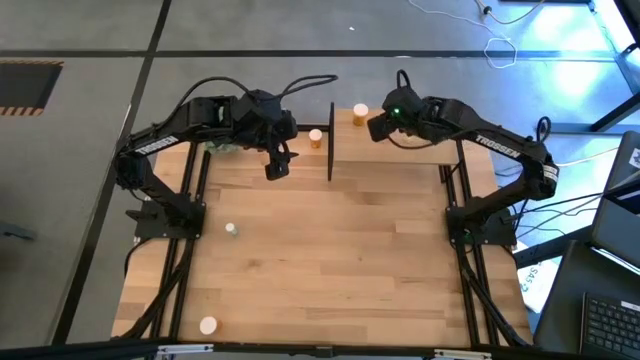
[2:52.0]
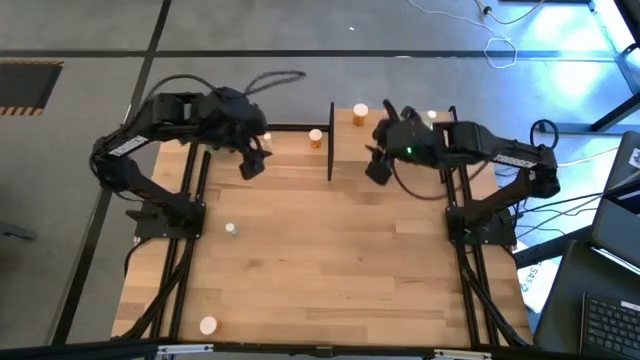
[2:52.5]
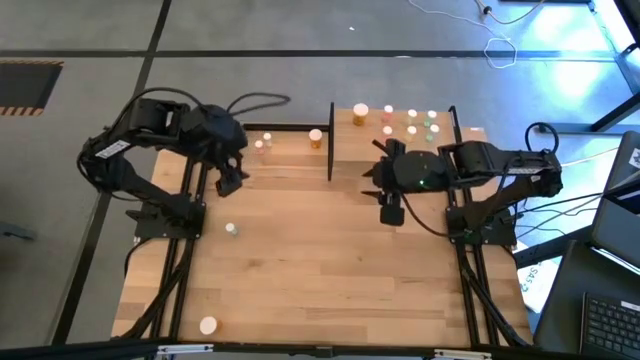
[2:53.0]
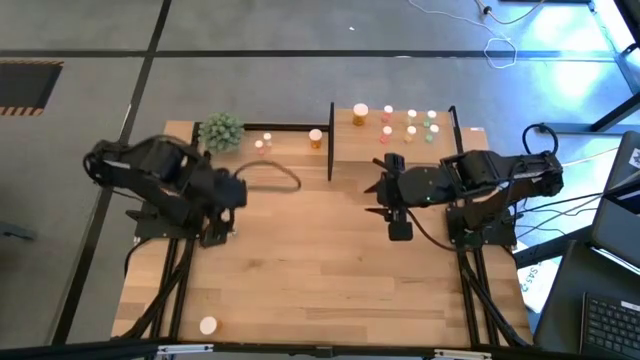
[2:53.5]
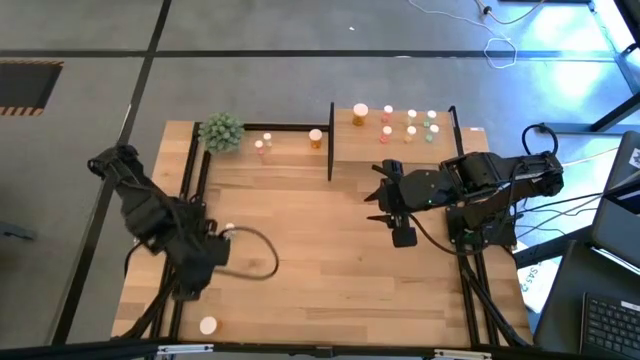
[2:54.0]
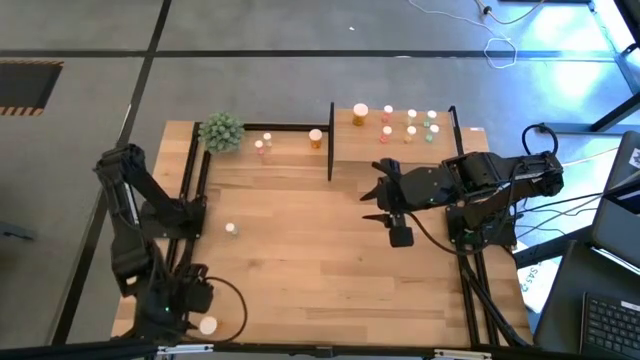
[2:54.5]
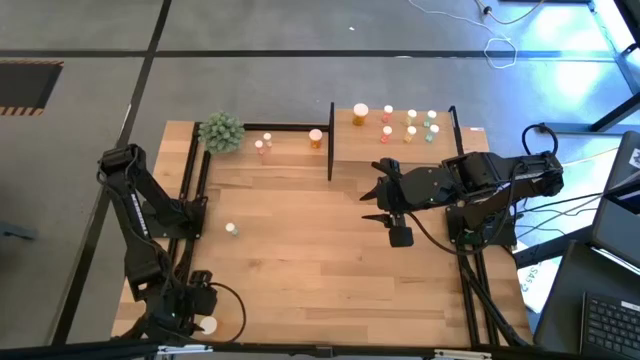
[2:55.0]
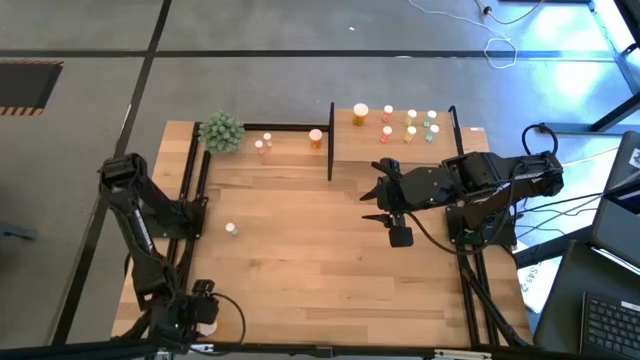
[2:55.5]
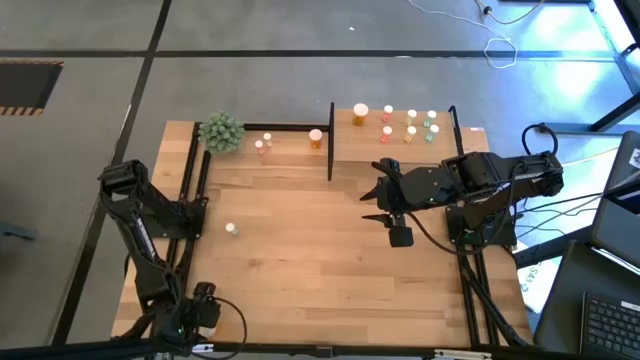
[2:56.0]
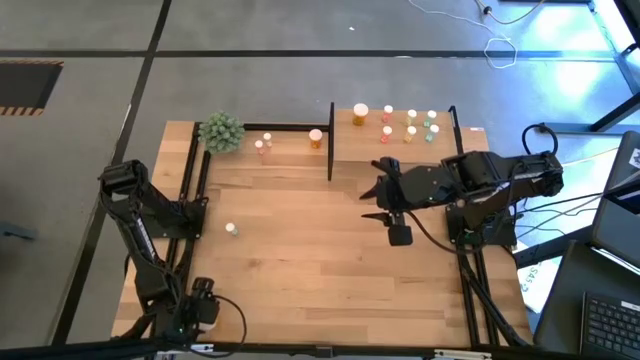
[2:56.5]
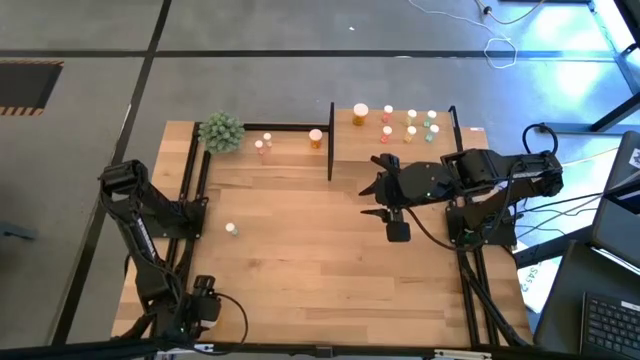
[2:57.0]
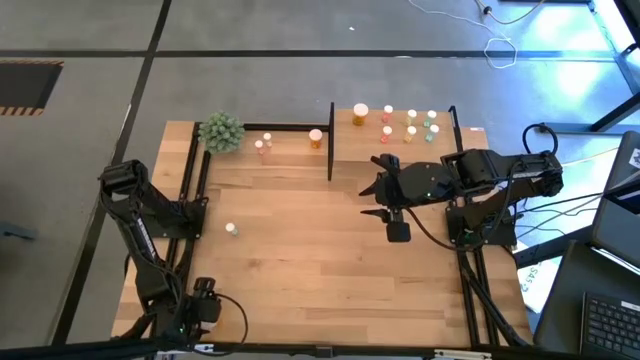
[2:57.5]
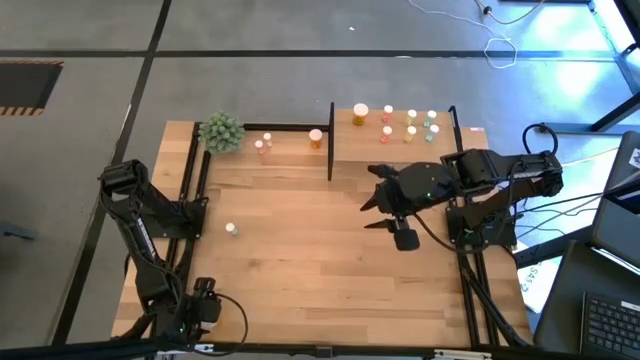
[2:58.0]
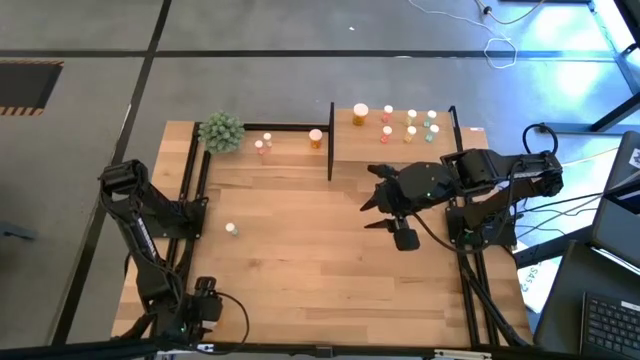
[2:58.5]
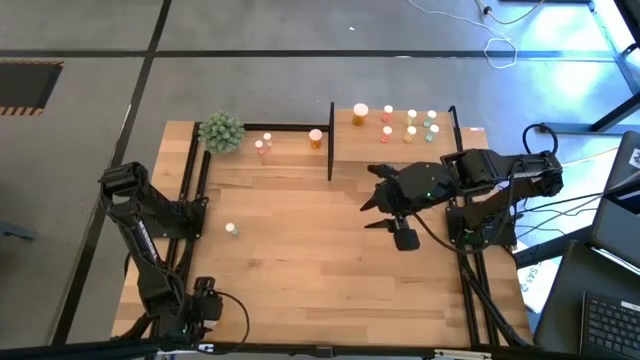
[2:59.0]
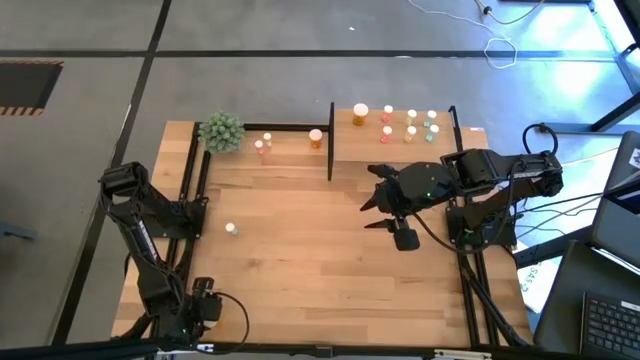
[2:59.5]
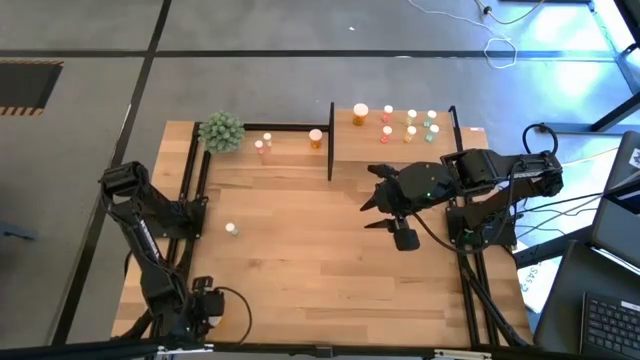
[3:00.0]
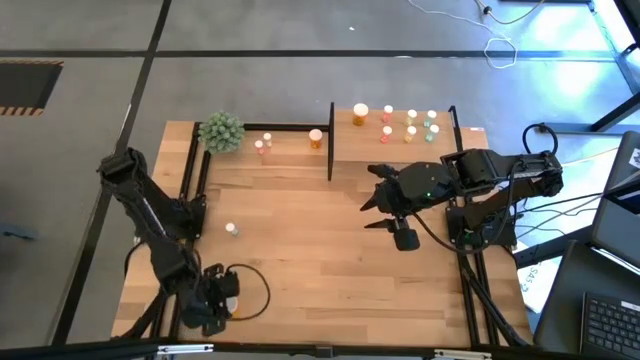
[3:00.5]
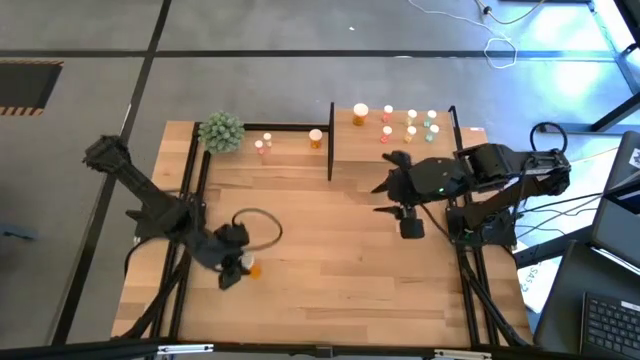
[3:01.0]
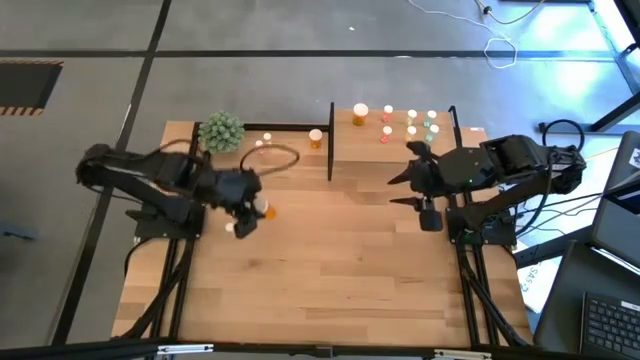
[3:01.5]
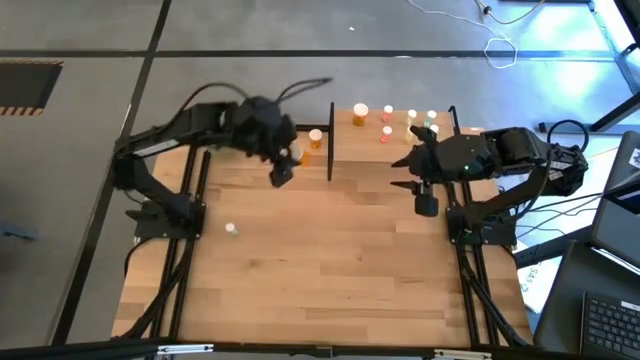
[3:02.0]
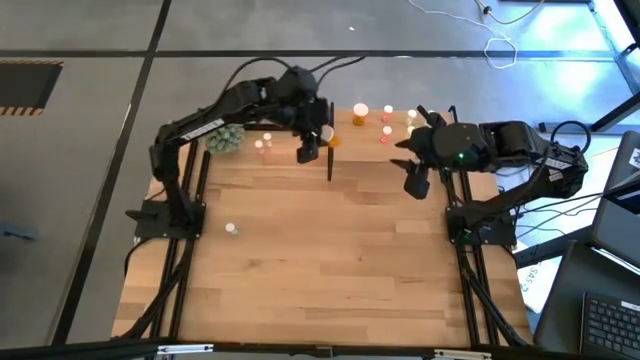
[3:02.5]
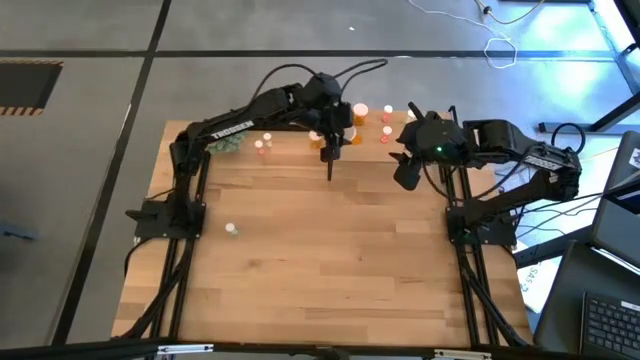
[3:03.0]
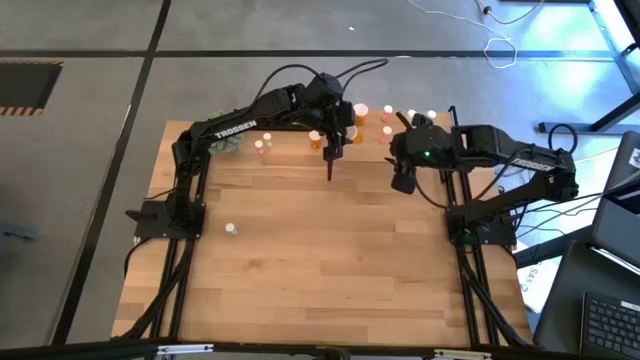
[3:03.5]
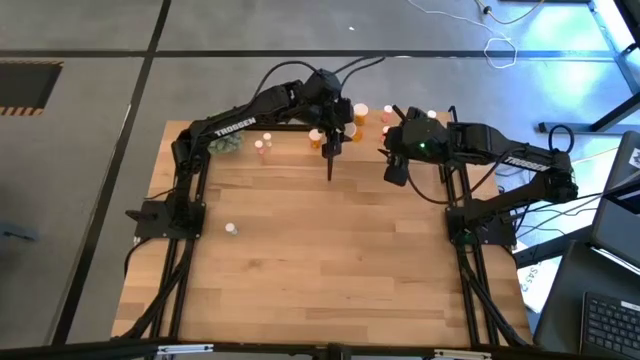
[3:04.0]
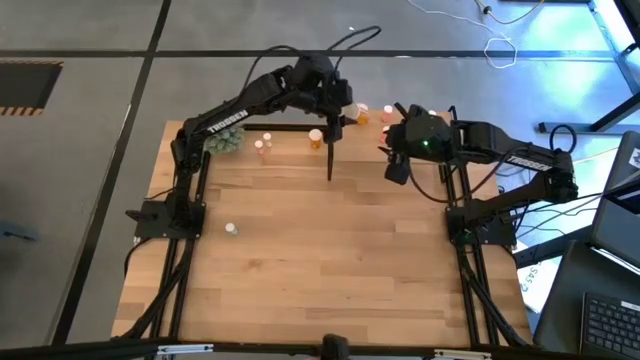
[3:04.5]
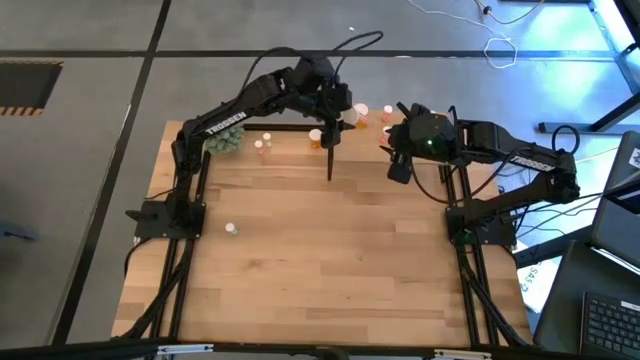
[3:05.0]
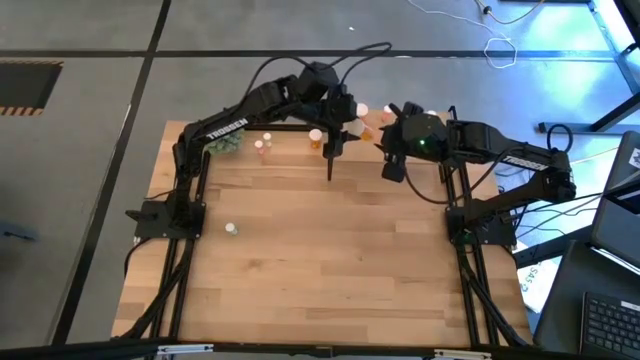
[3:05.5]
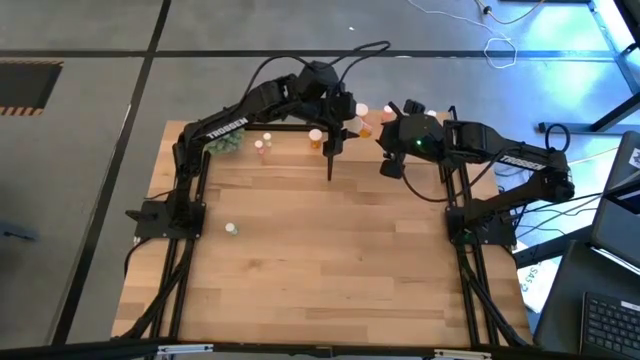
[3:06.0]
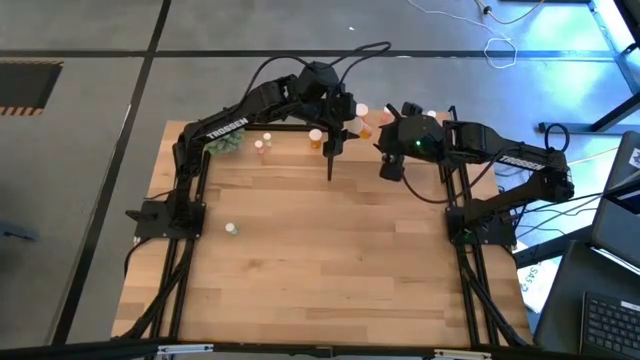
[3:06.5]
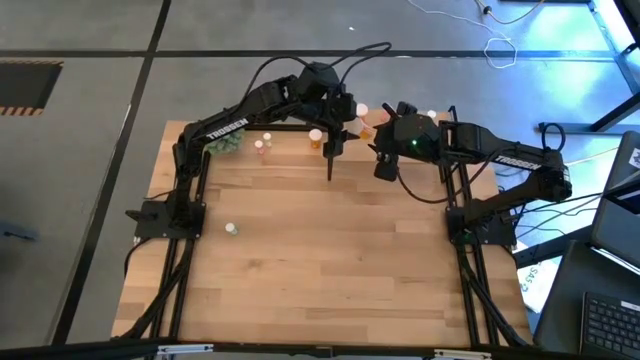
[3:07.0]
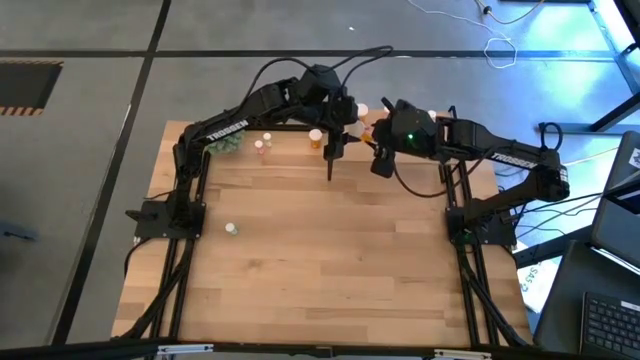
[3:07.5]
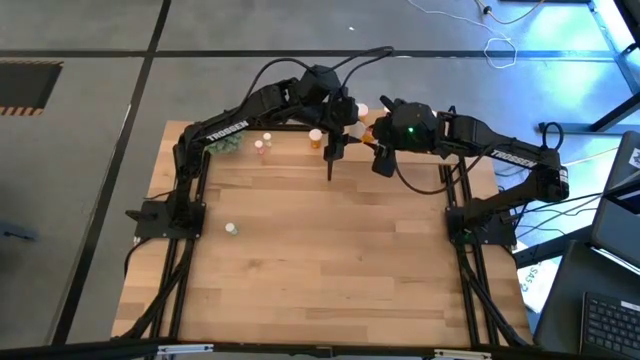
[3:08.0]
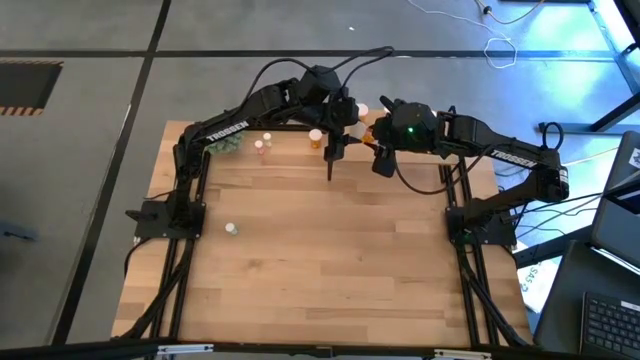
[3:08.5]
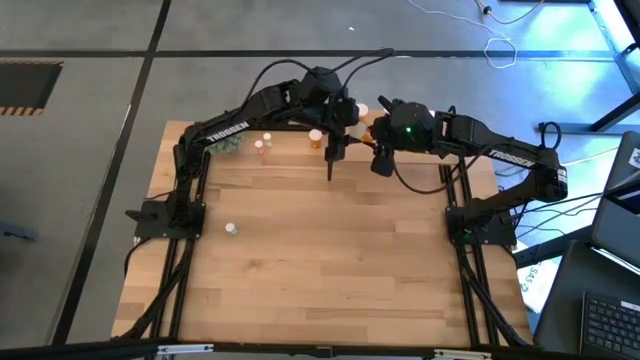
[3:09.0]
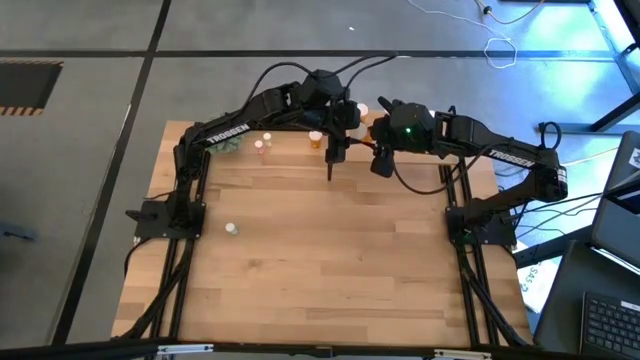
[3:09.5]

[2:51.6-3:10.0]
Task: Pick and place medicine bottles onto shelf by color
Put the bottom orange pill bottle on the shelf aligned with the other orange pill bottle

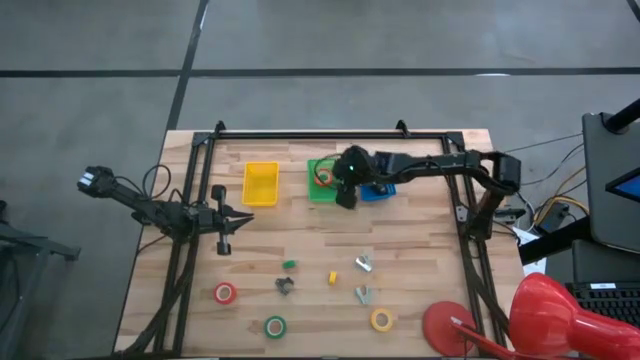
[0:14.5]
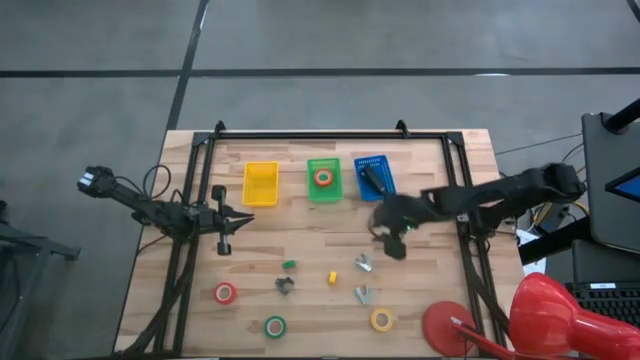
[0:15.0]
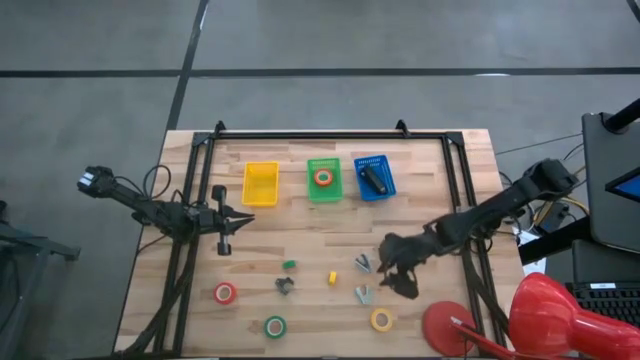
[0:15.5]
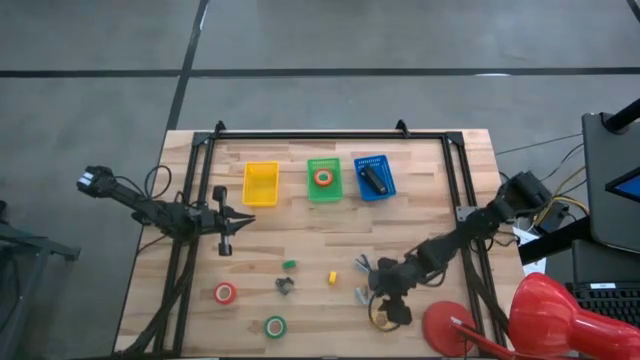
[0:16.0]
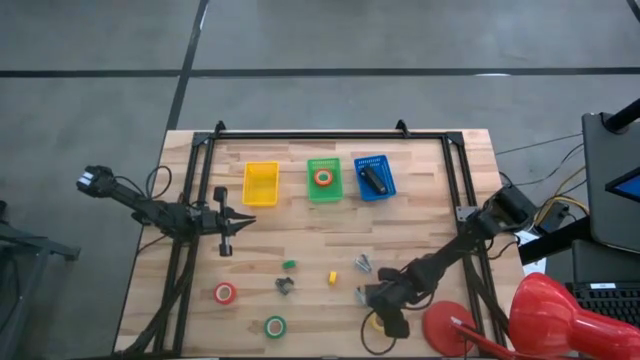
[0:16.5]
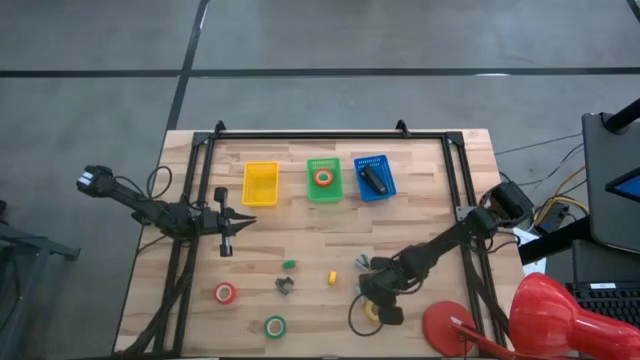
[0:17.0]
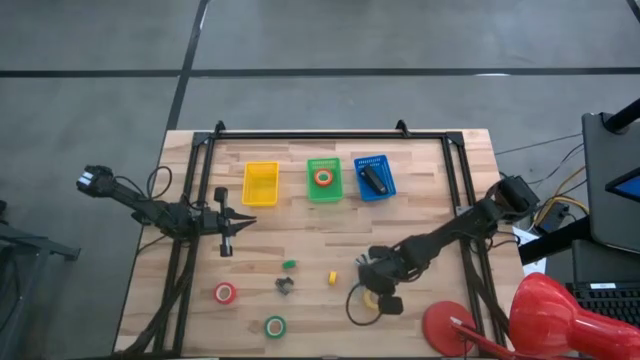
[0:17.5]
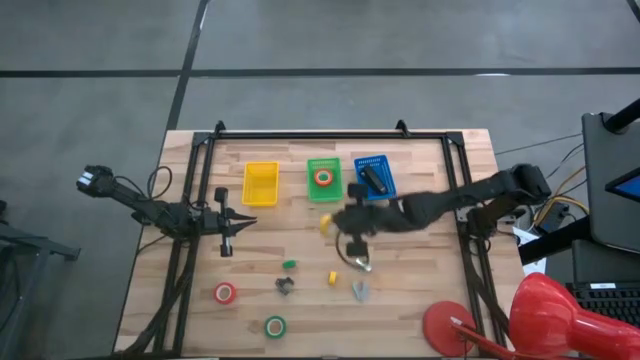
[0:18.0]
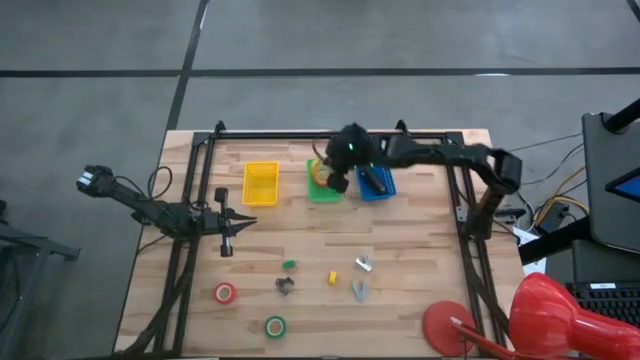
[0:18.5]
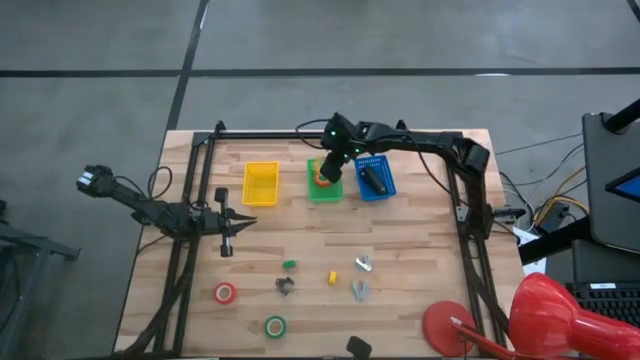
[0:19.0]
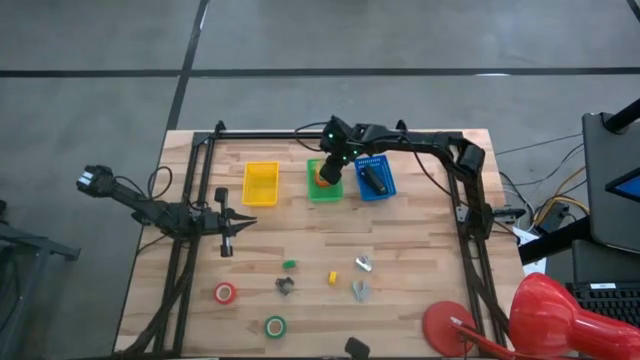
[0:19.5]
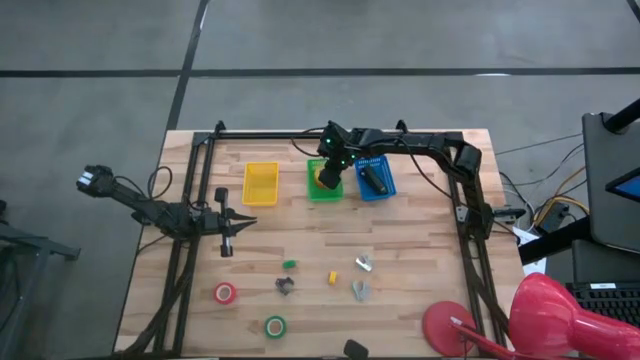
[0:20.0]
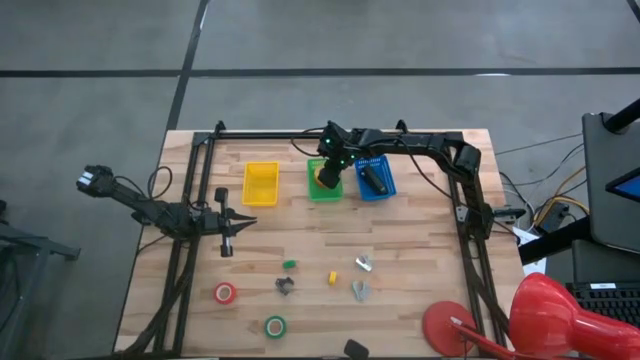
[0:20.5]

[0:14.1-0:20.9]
Task: Pick and place Stapler, Stapler remover, tape
Put the yellow tape into the green bin
